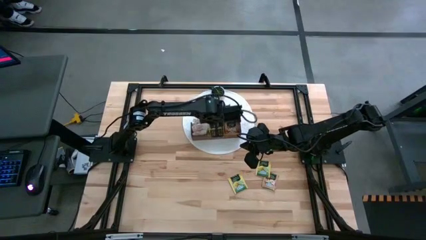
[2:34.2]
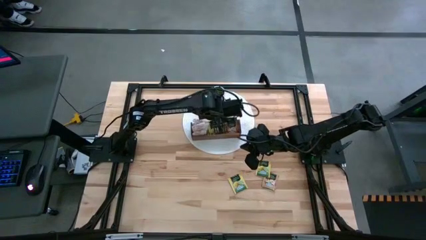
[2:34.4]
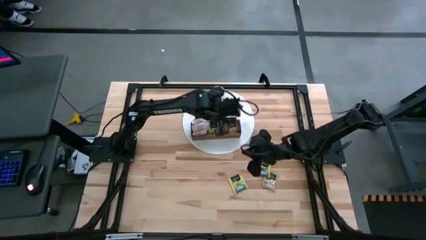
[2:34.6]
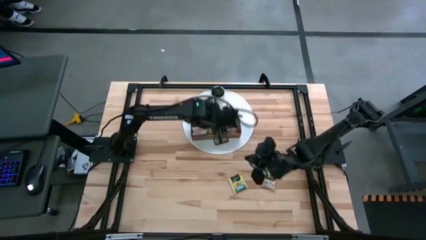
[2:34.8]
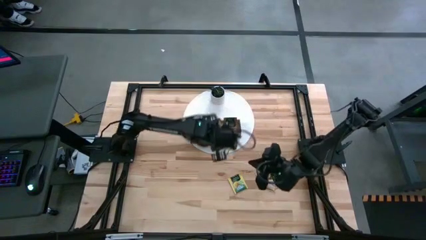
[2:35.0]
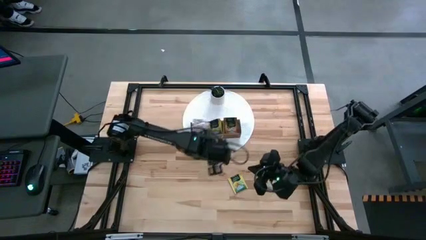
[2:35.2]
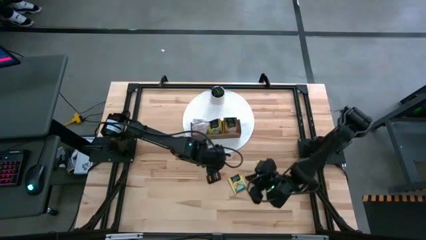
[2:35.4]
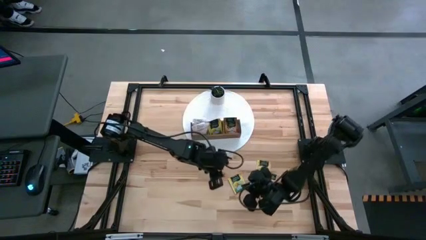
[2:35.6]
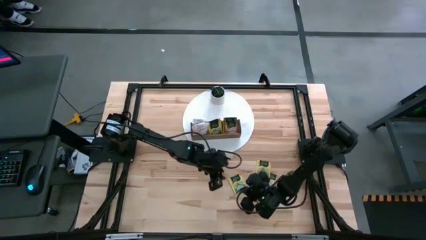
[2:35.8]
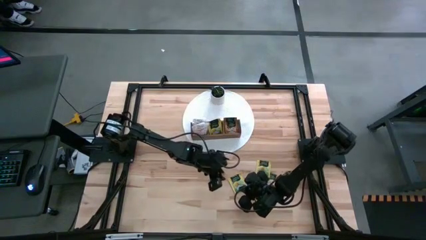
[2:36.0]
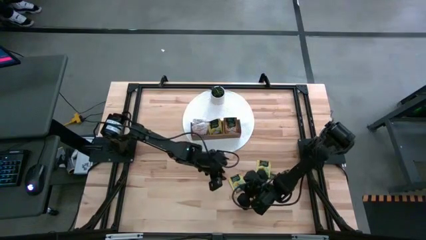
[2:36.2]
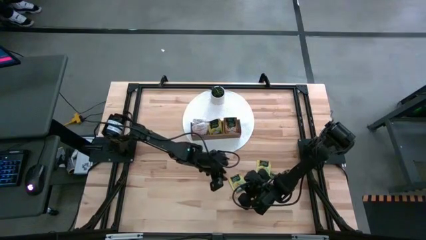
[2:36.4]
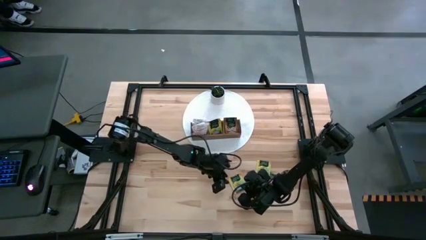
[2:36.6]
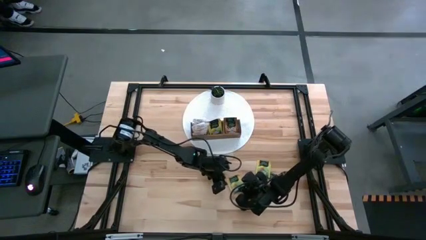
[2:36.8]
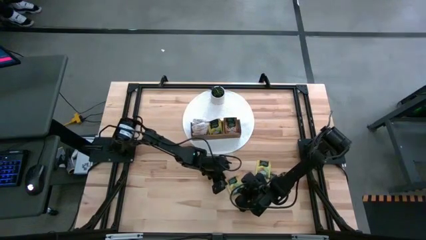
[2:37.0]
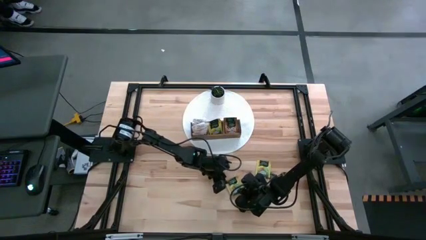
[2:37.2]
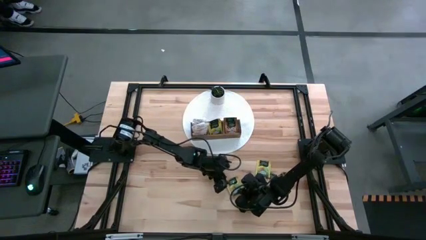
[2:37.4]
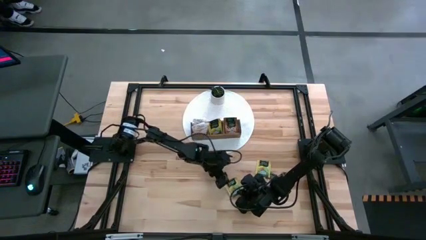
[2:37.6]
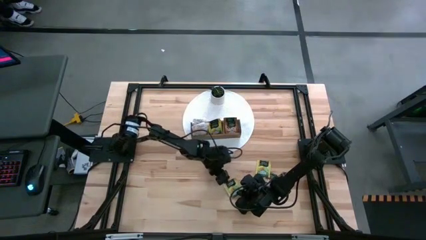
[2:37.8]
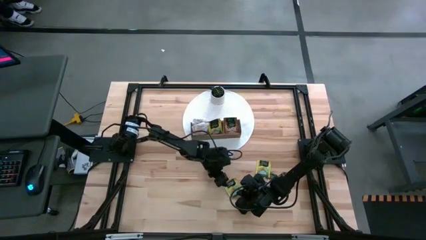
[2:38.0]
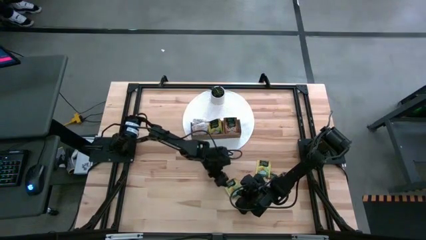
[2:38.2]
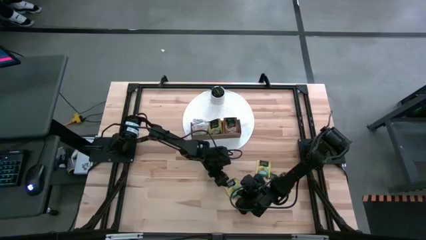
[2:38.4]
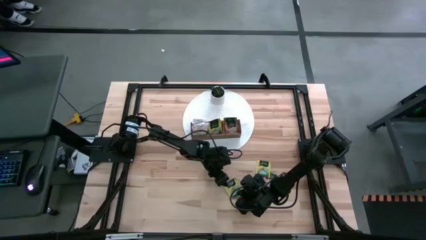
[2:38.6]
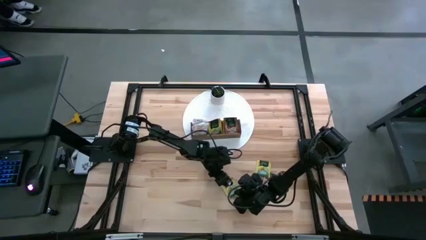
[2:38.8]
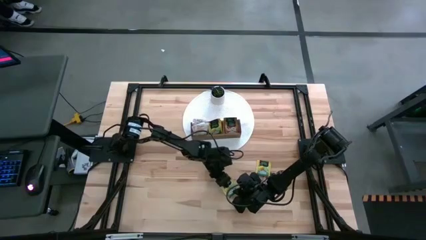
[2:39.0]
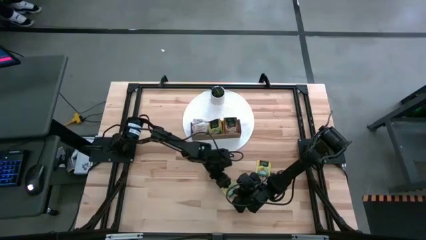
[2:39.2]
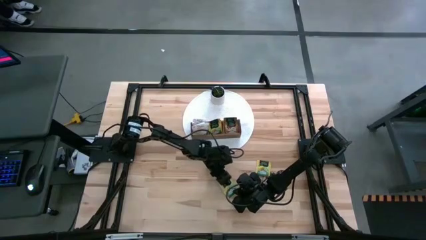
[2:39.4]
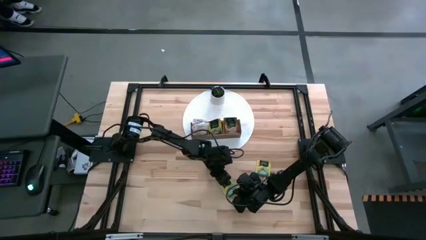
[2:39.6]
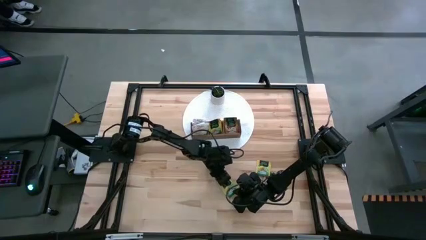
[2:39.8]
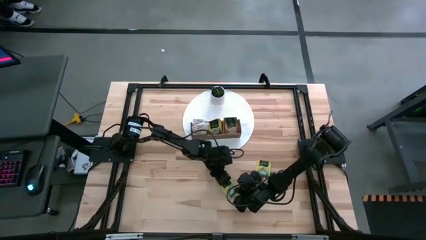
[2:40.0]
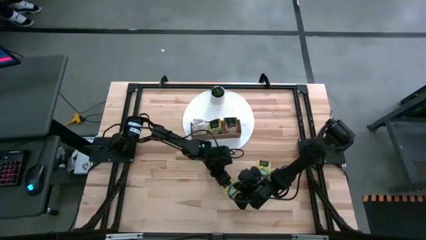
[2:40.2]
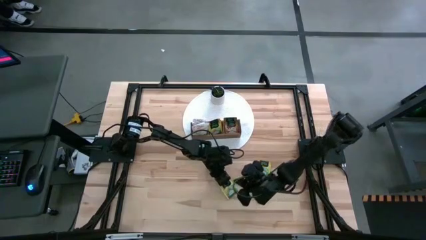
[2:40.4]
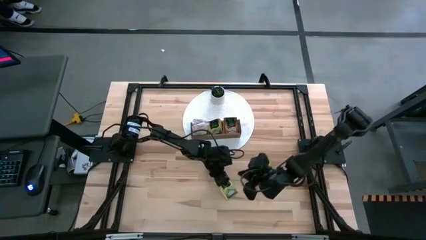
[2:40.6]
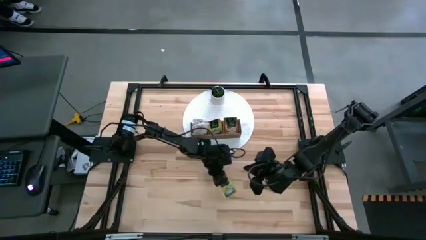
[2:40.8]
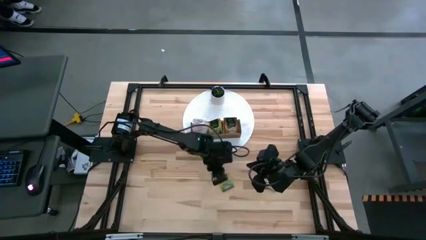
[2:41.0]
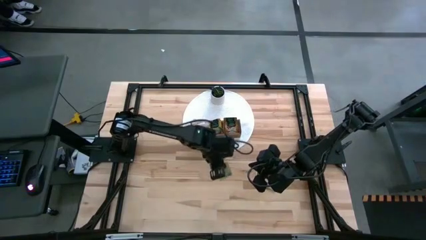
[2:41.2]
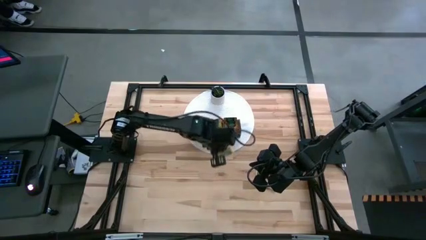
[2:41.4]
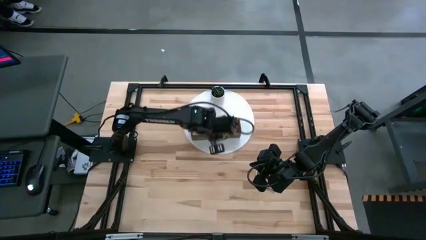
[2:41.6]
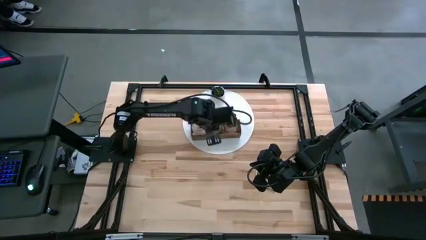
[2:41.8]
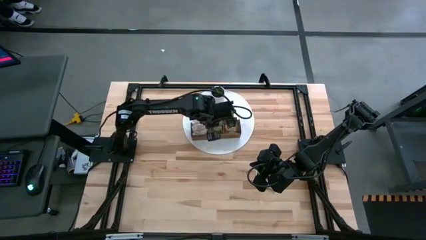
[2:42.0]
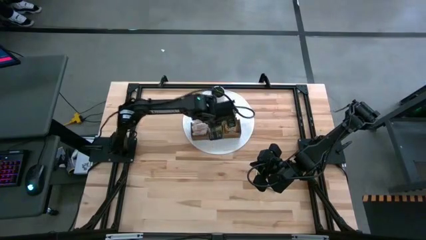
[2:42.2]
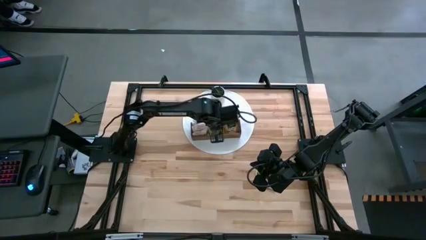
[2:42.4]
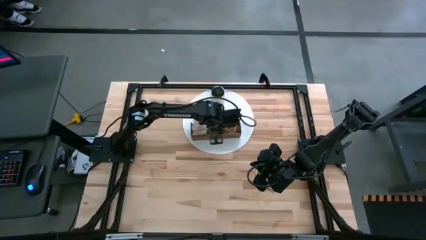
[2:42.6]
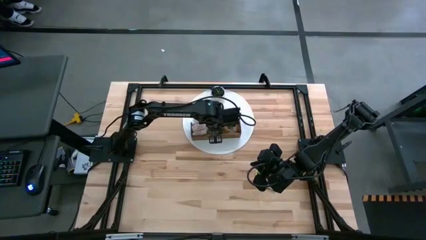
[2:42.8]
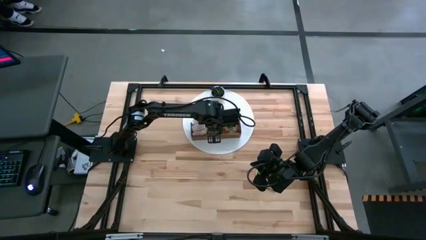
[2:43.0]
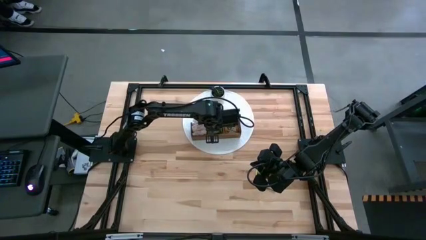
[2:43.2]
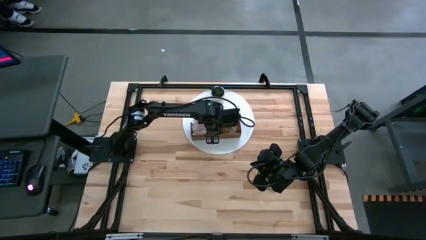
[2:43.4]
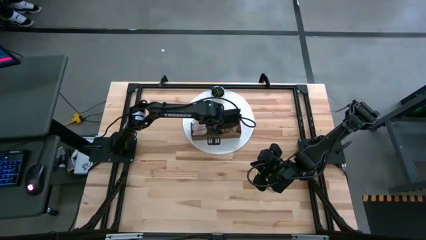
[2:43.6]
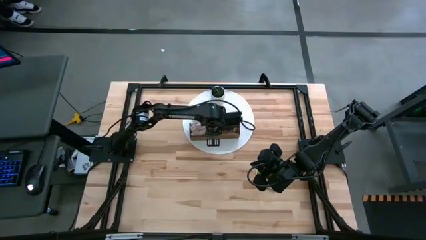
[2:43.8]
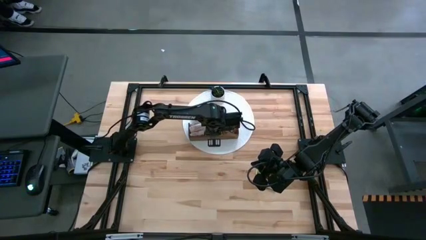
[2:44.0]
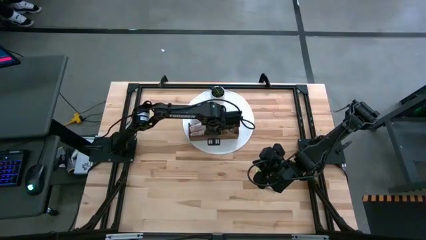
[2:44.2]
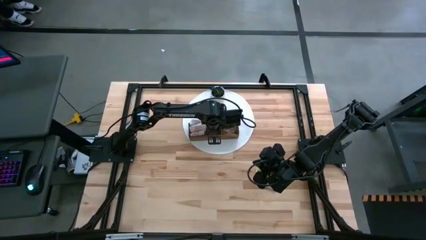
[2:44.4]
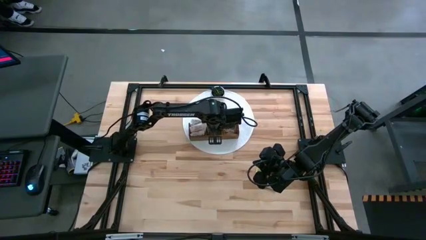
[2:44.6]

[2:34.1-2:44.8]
Task: Pick & Place Tea
Put the yellow tea bag into the middle section of the wooden organizer

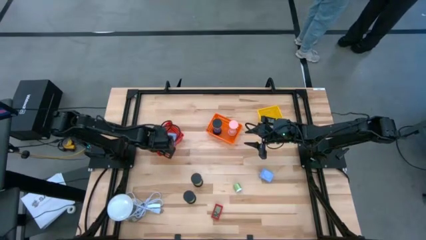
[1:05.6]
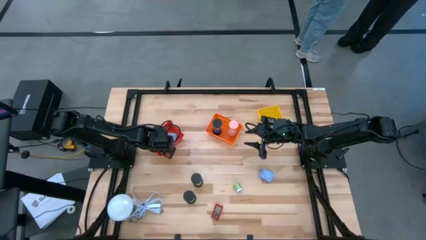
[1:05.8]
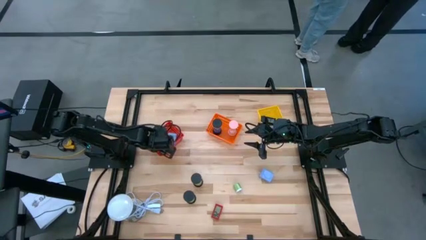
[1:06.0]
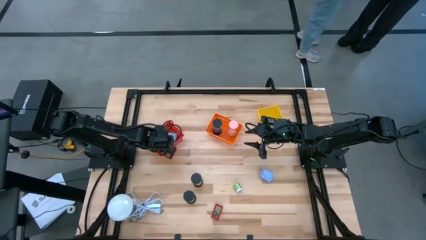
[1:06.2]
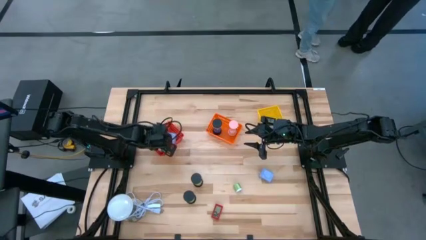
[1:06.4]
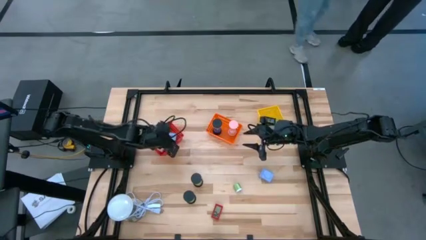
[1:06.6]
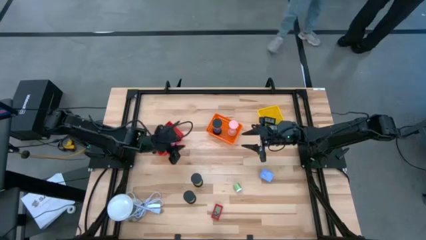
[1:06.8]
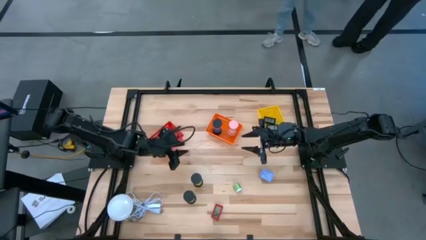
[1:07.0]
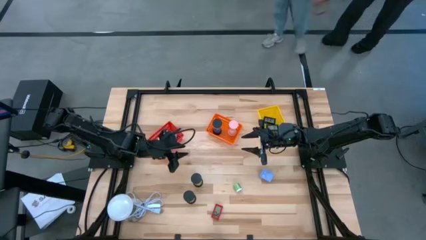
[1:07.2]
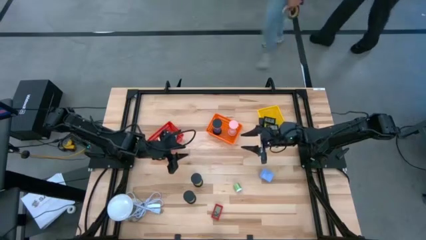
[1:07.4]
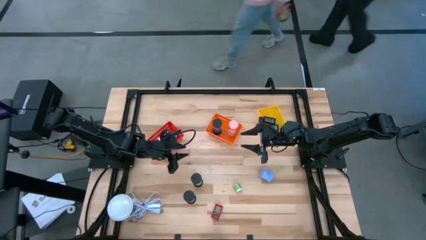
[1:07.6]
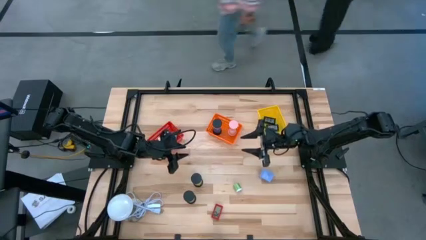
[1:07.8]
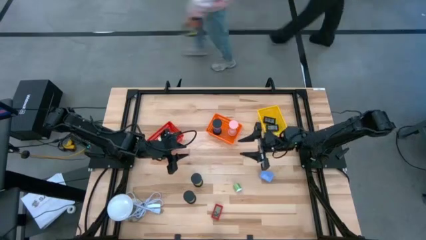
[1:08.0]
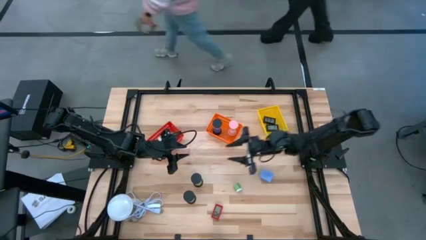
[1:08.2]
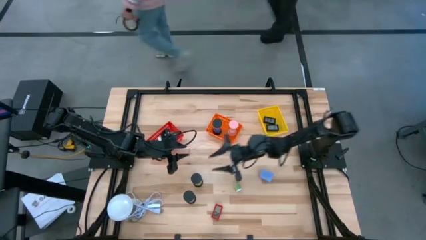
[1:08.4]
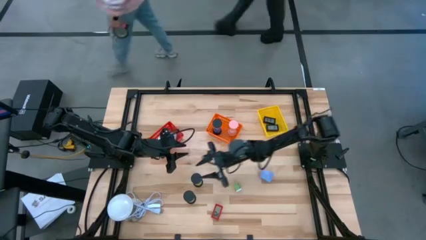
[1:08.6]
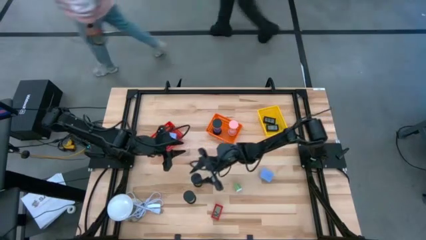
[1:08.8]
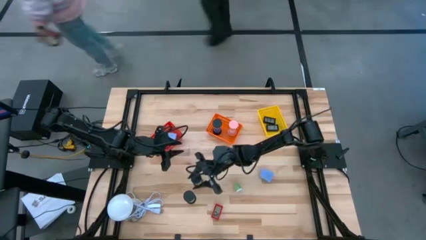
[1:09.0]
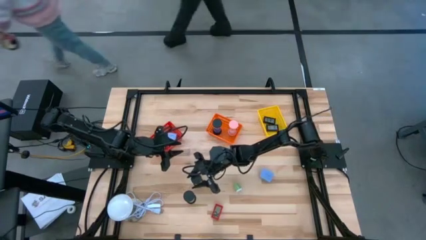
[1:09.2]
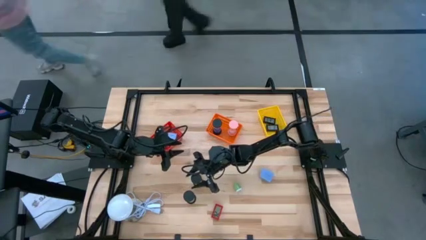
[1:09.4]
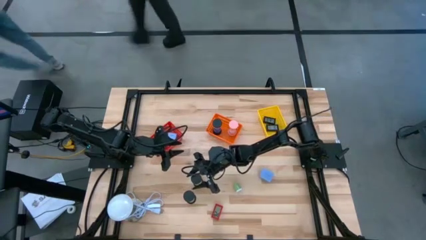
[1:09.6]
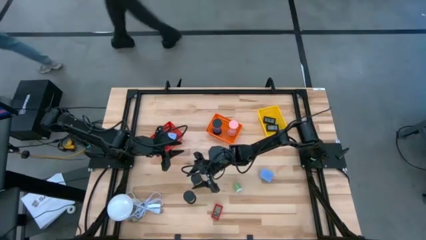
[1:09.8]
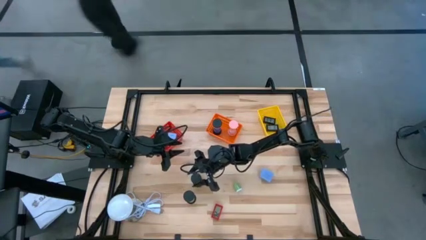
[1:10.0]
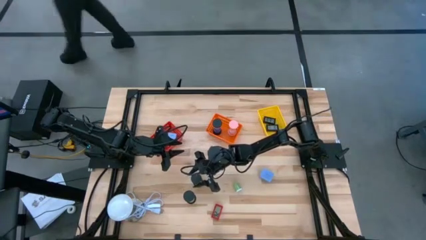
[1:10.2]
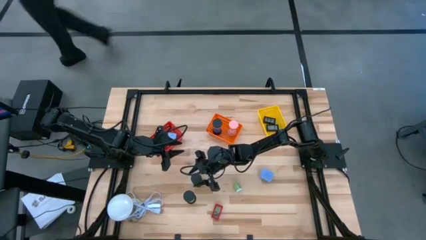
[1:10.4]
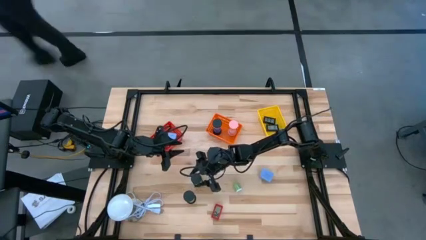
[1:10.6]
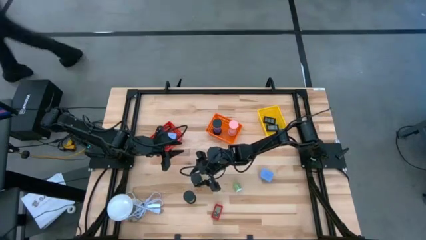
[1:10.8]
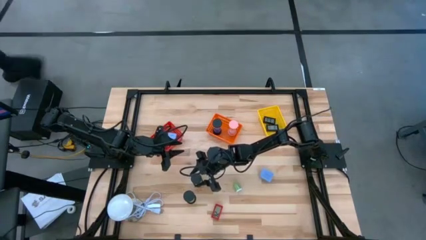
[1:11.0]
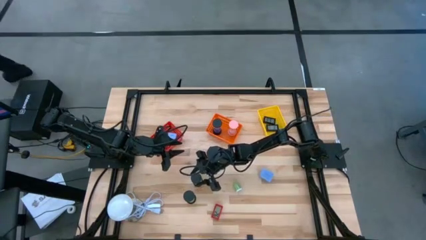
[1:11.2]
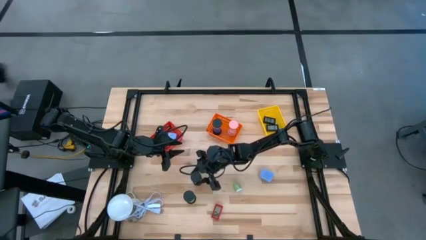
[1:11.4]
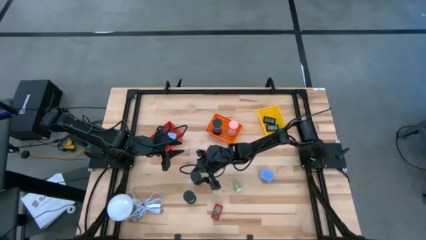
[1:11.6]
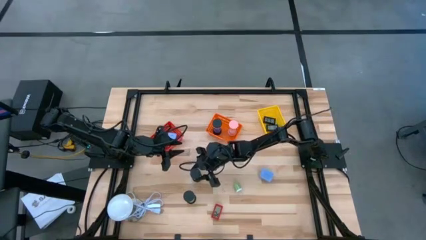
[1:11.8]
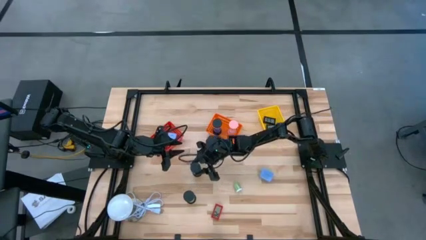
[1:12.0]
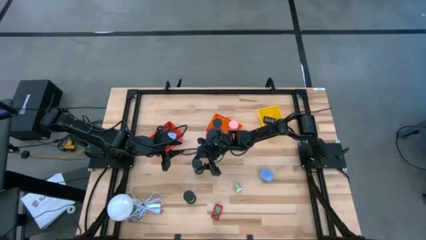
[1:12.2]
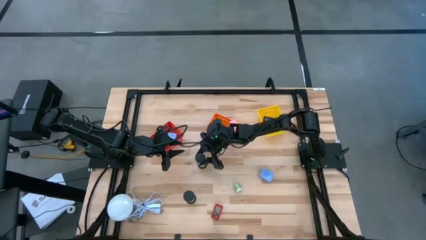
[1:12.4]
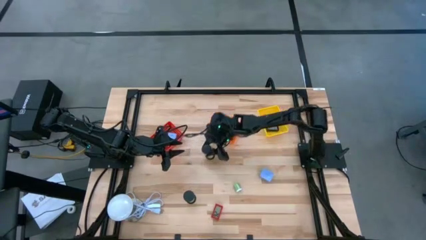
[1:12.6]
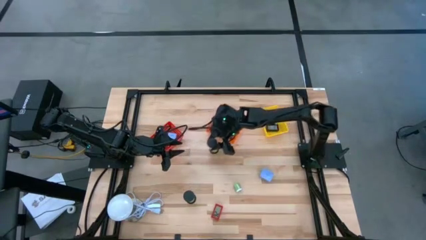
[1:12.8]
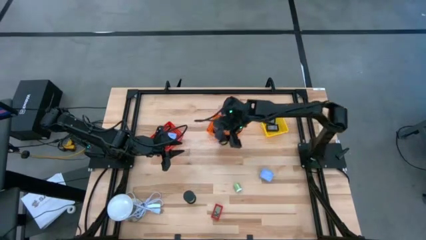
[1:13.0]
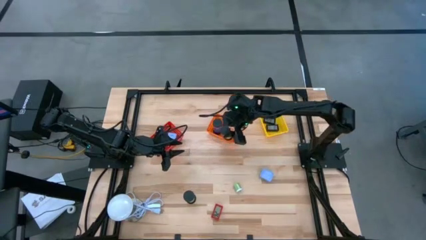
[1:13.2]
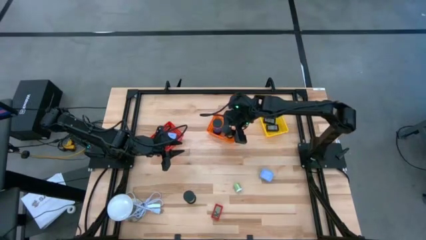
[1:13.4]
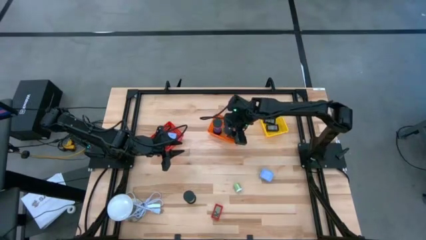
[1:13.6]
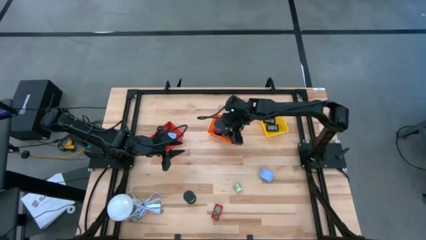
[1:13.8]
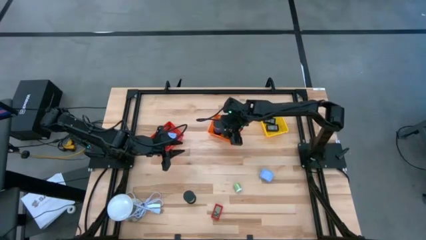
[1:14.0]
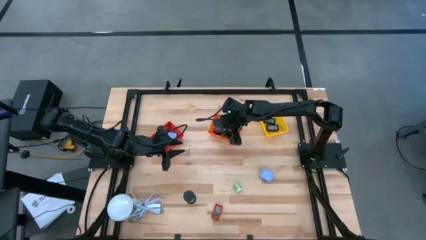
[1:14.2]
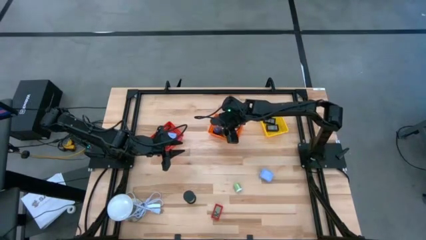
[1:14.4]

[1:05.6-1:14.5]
Task: Pick & Place Office items
Put the top black hourglass into the orange basket
